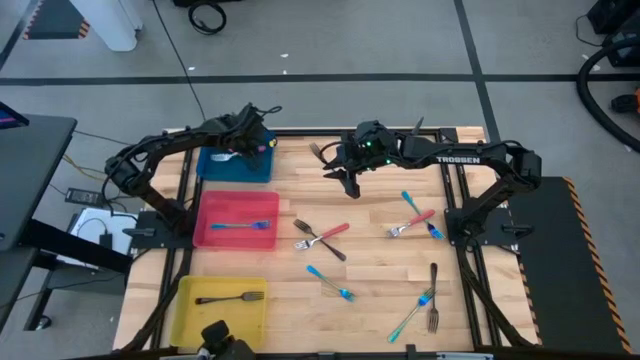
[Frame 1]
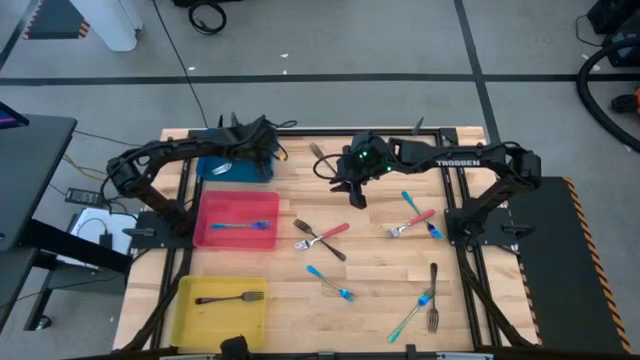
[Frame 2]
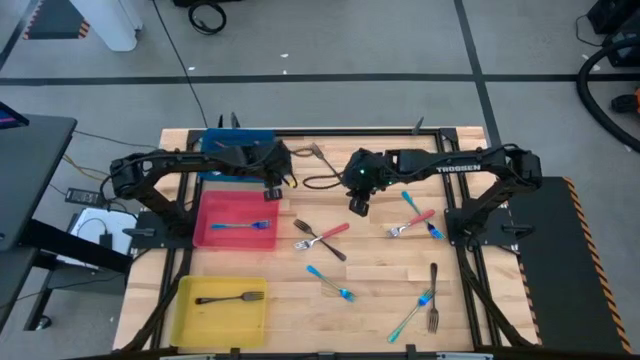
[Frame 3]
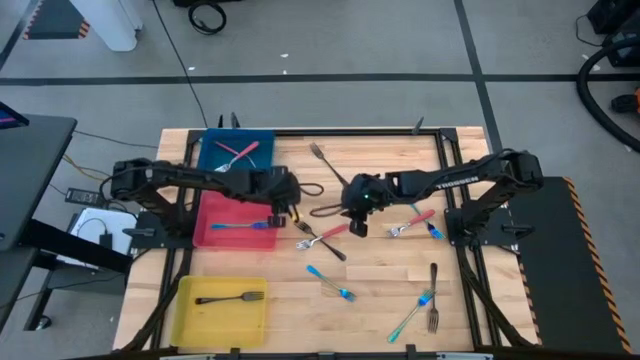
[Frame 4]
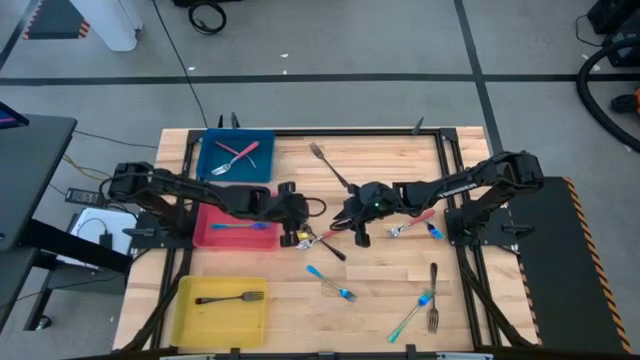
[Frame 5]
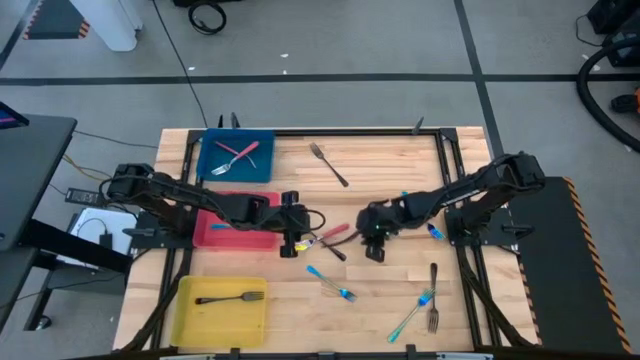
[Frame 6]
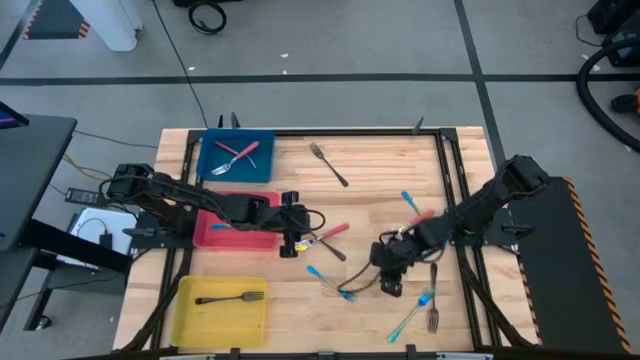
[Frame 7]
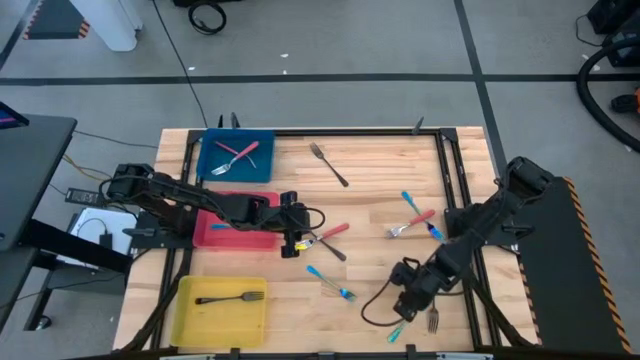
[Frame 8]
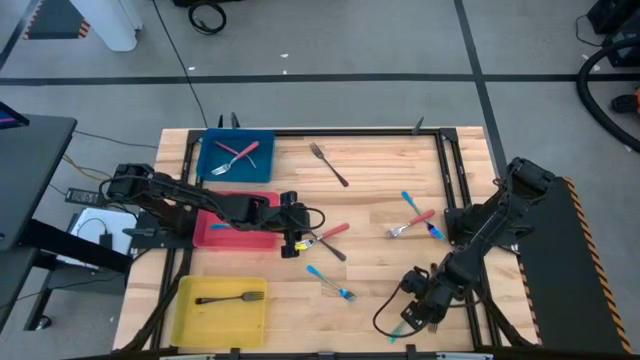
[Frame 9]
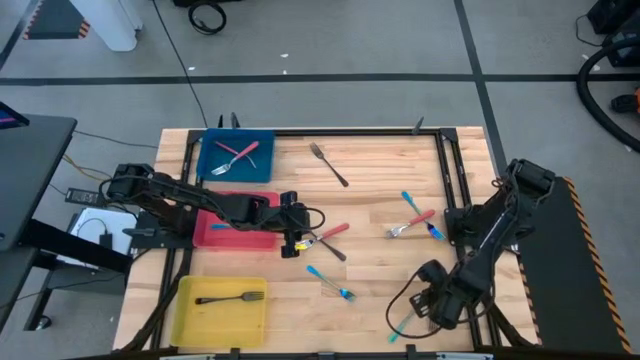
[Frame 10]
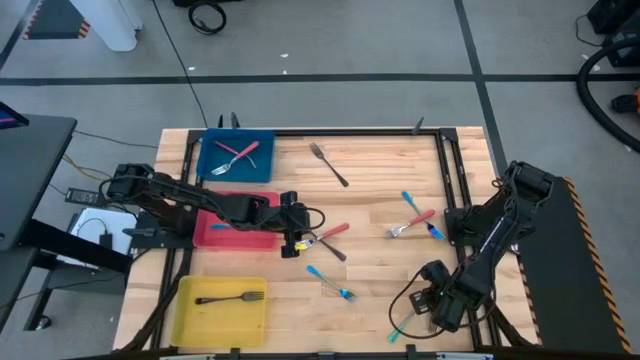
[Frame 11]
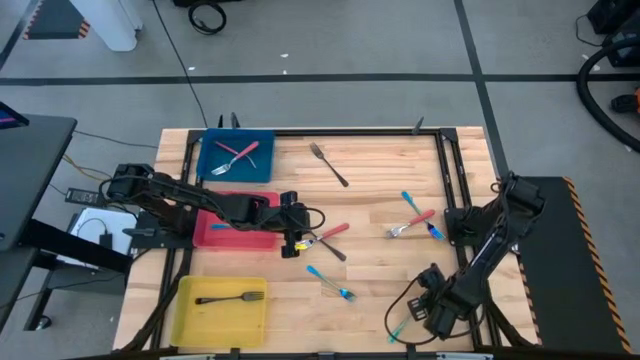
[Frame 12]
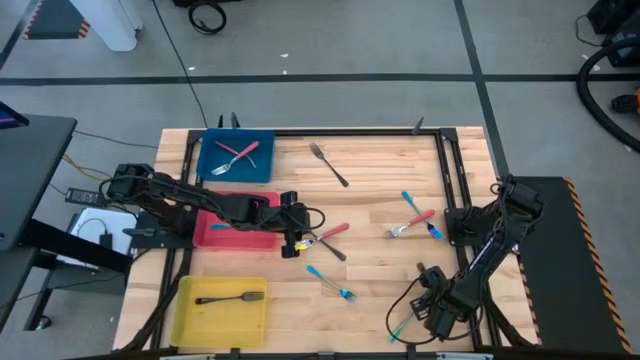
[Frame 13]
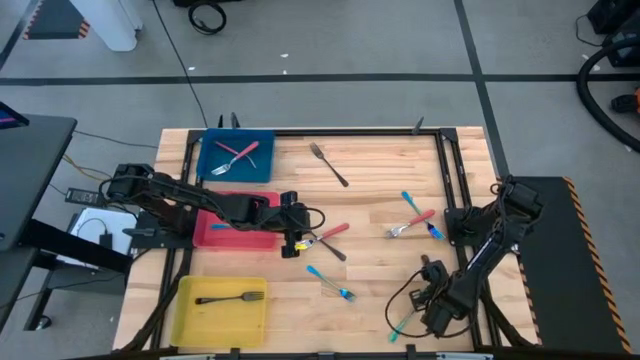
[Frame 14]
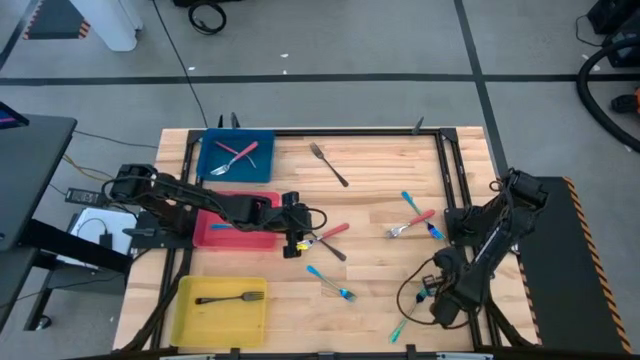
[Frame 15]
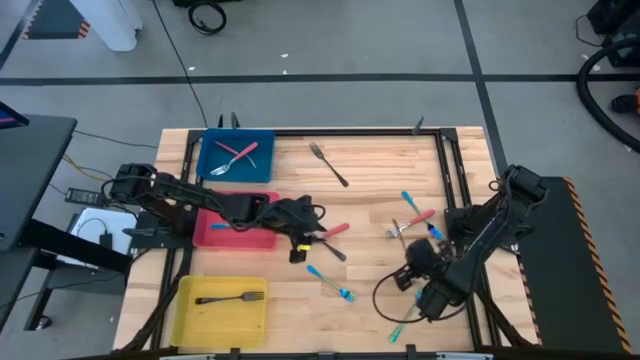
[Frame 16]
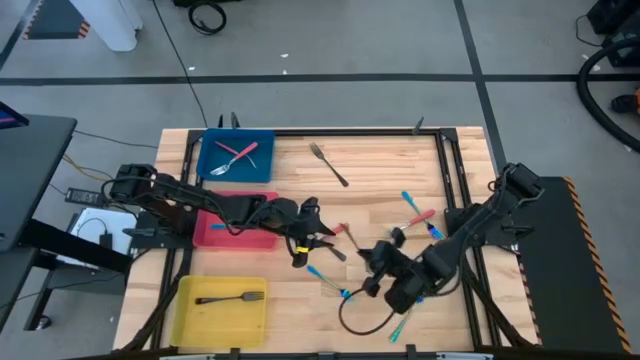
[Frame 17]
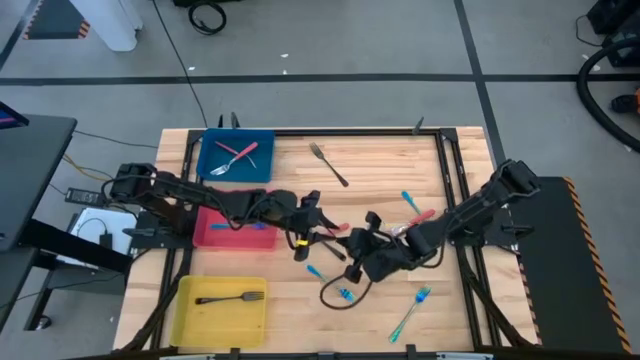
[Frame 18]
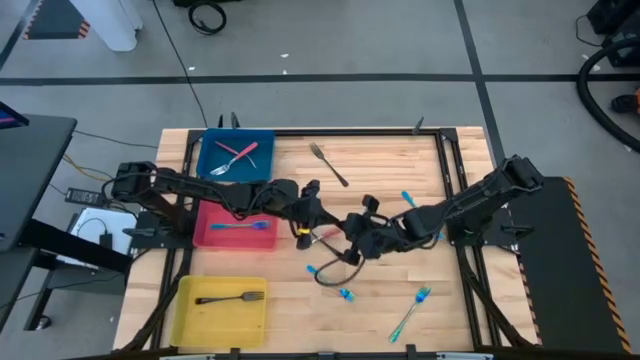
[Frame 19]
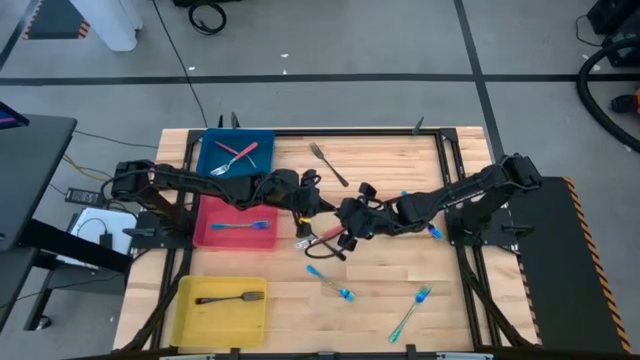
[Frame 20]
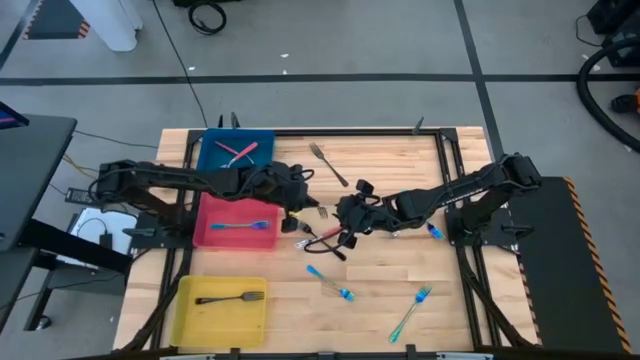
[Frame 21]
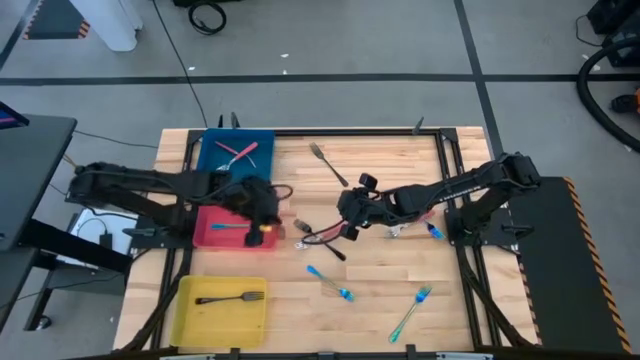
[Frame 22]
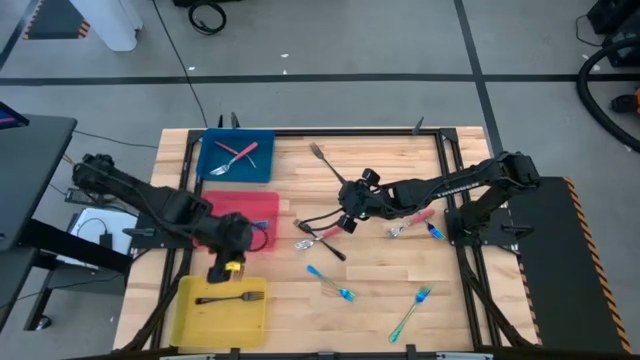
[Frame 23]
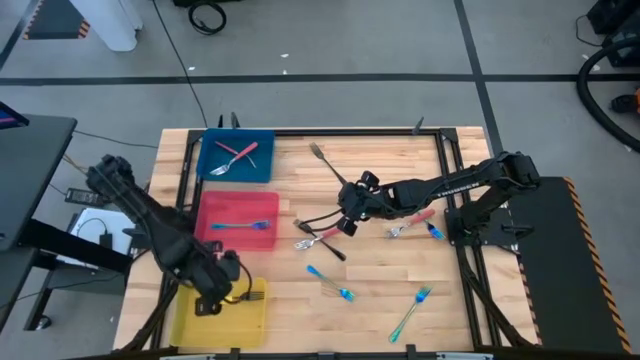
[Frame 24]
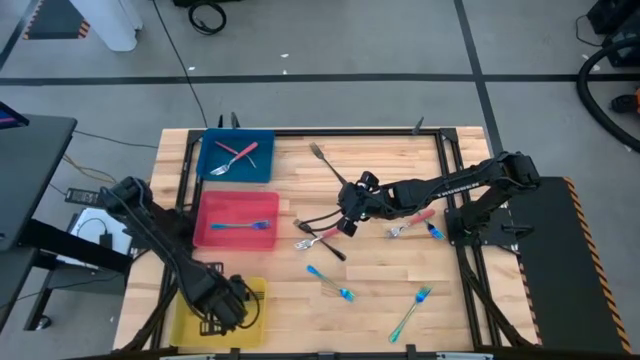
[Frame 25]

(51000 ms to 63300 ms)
Task: Sort silverware by color (type)
Put the bottom right black fork into the yellow bin

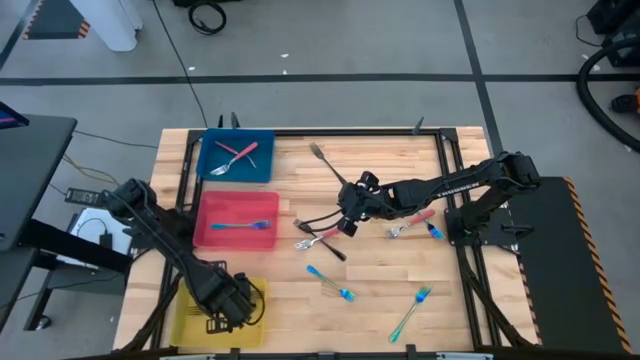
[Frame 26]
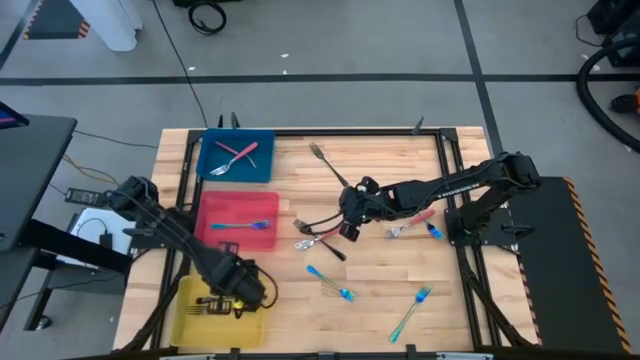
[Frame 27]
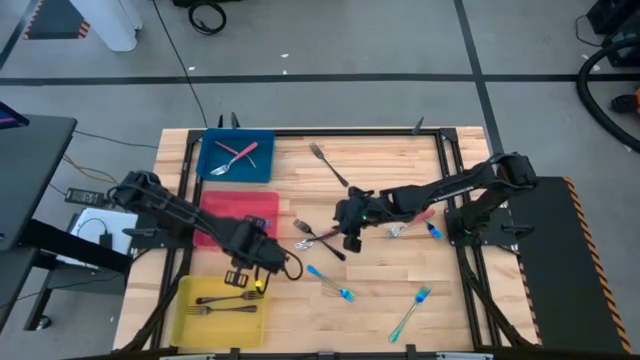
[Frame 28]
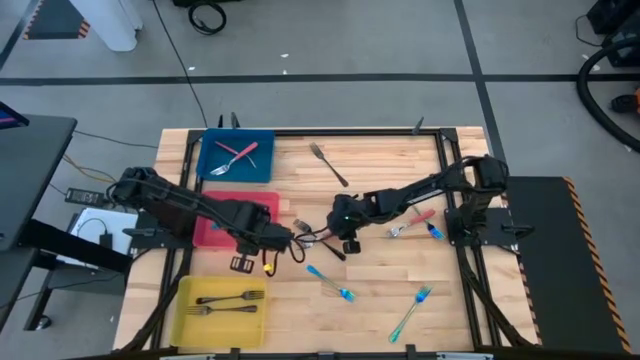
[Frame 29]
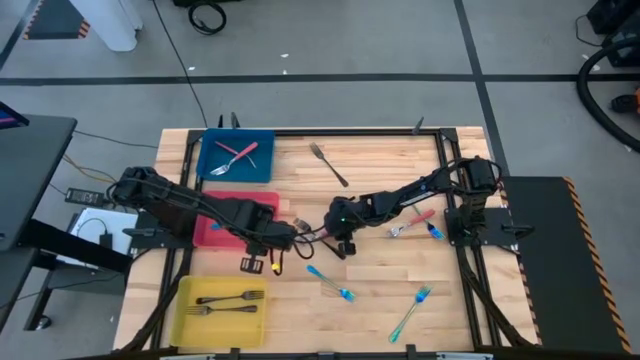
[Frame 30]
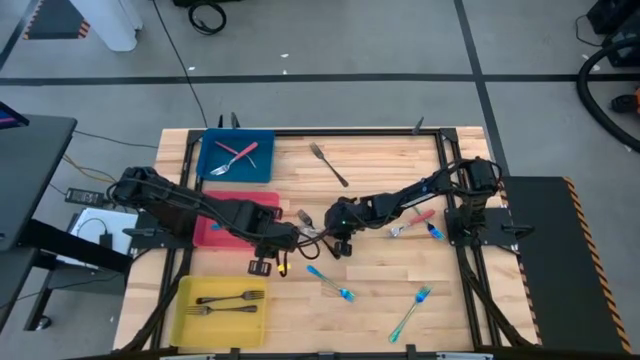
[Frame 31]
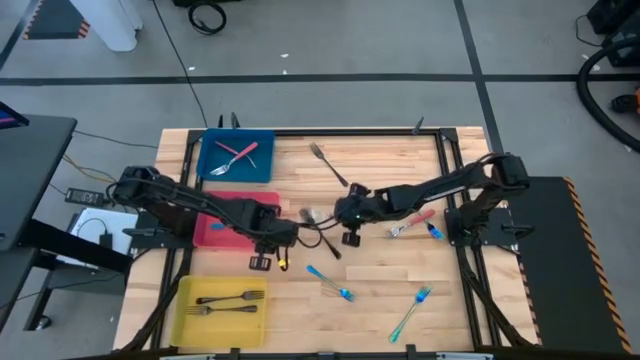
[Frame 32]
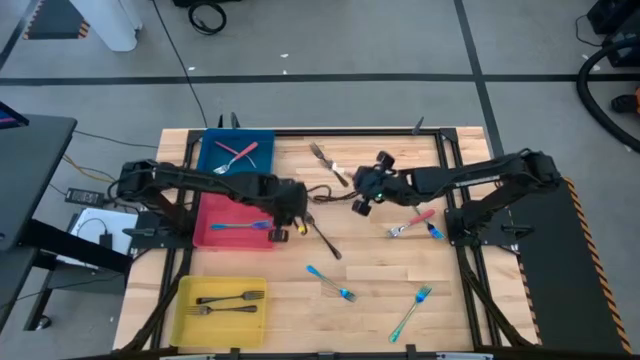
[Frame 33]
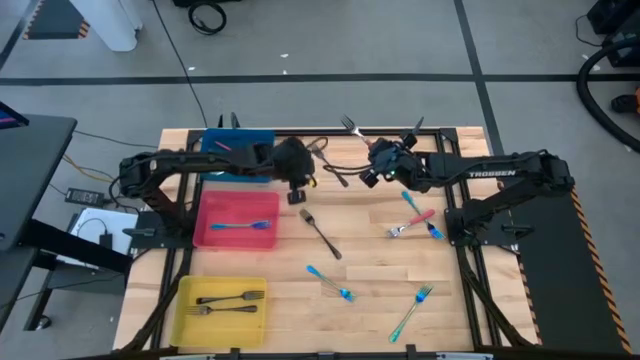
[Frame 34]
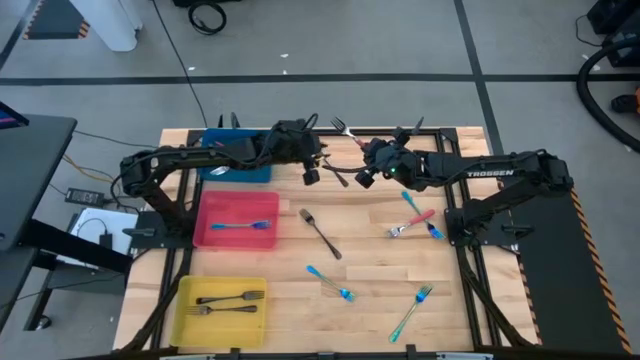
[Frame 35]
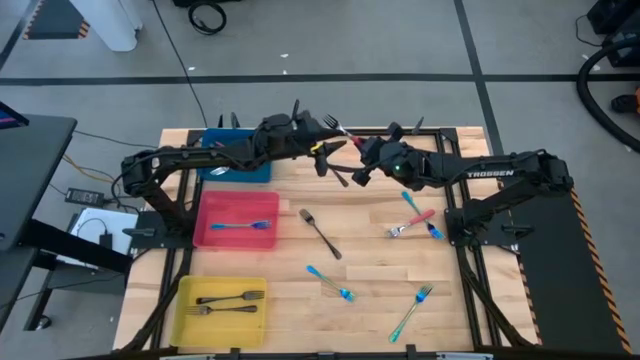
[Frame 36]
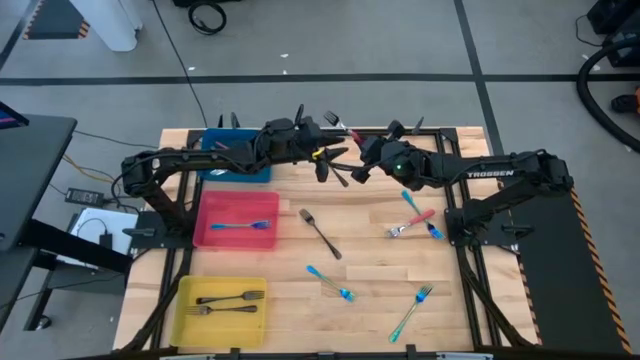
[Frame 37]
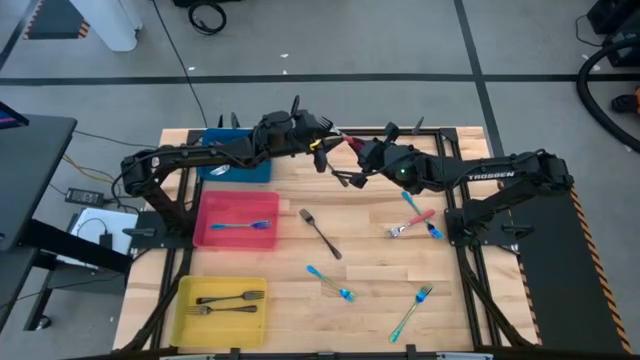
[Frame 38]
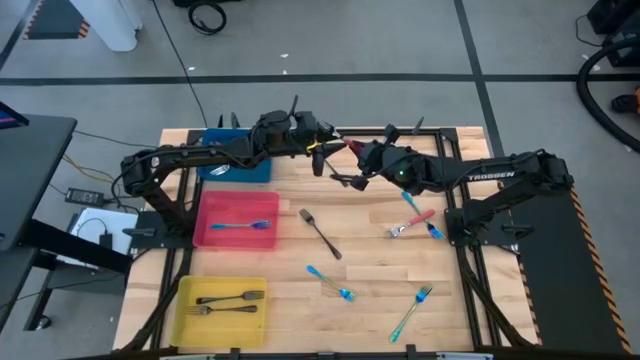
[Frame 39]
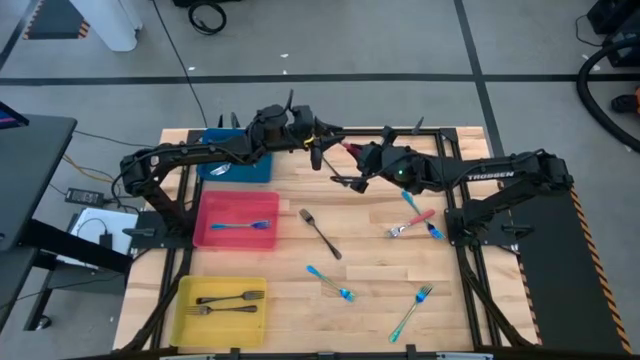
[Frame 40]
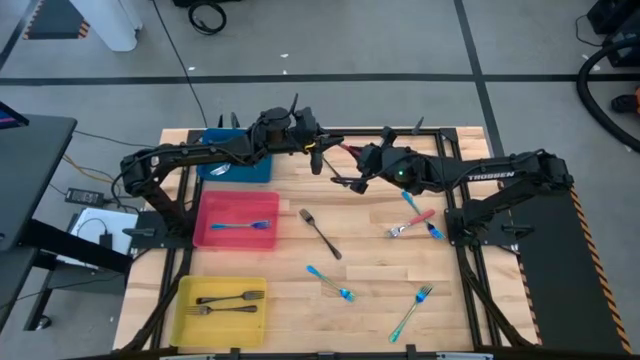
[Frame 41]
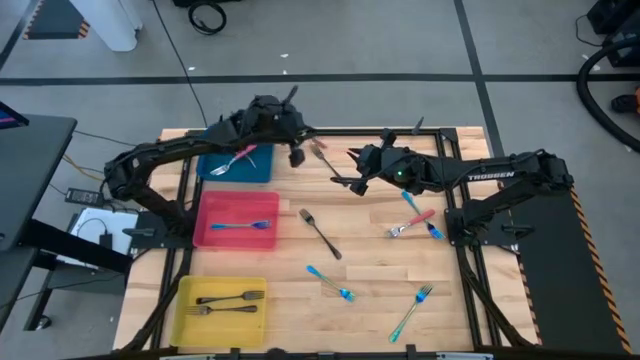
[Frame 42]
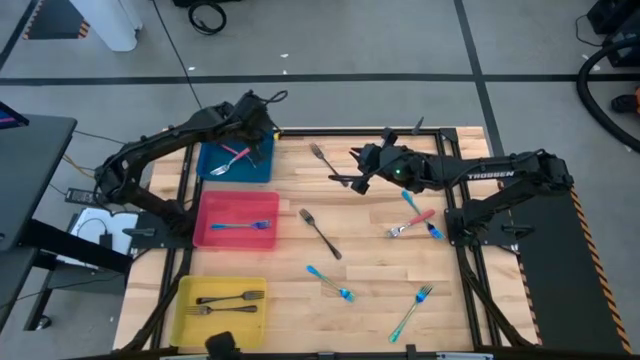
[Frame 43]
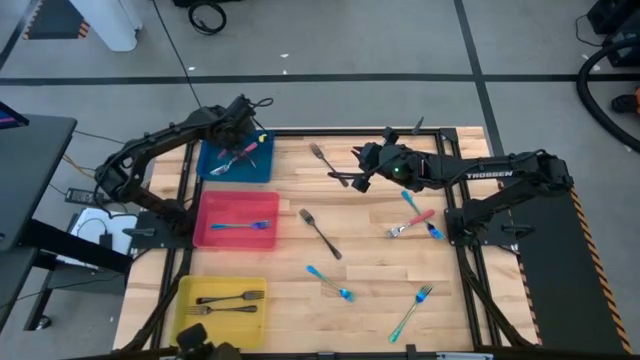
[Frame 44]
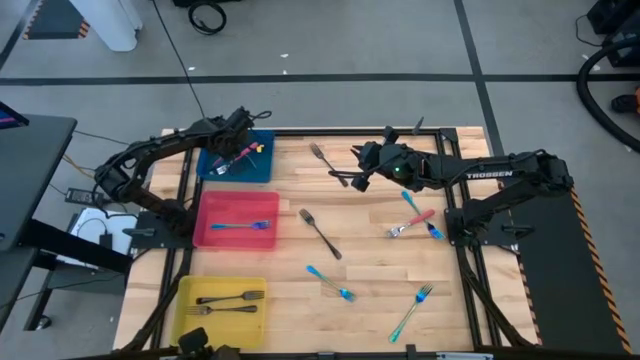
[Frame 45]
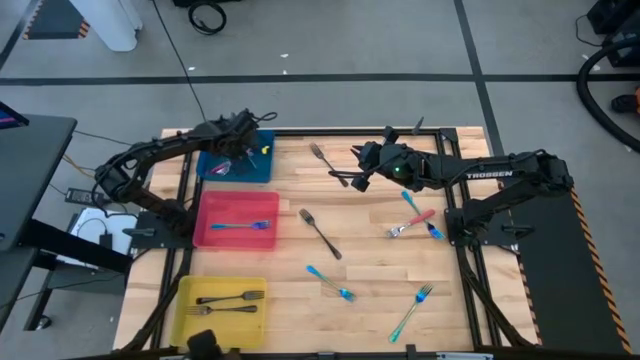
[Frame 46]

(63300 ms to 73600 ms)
Put the left pink fork into the blue bin
